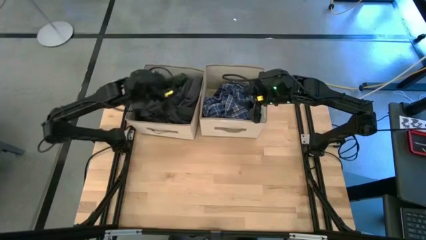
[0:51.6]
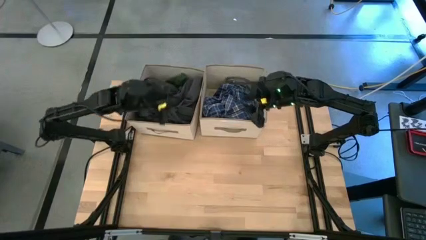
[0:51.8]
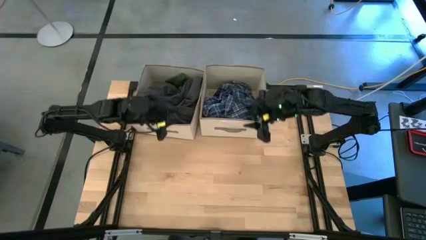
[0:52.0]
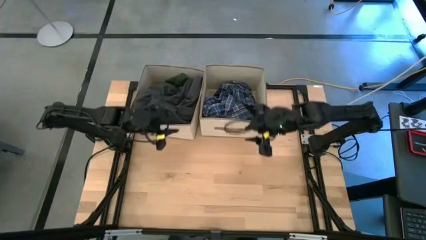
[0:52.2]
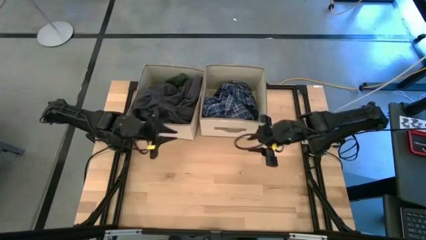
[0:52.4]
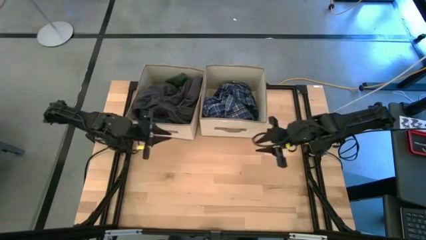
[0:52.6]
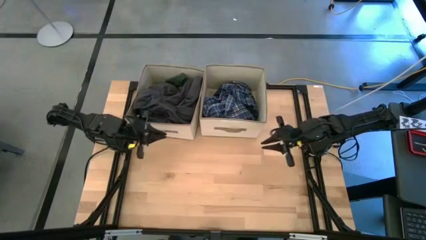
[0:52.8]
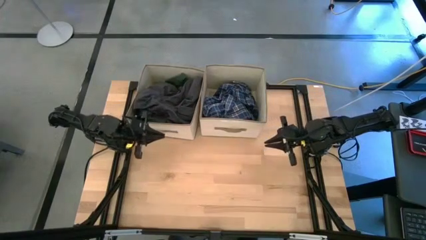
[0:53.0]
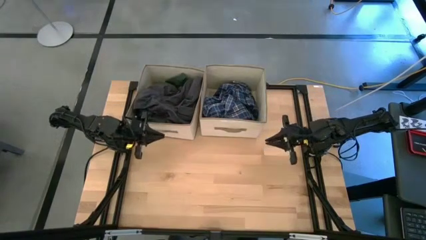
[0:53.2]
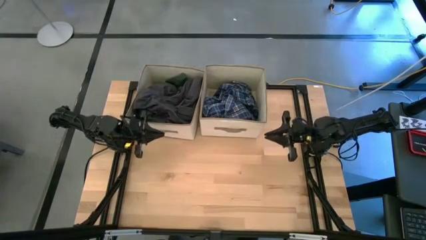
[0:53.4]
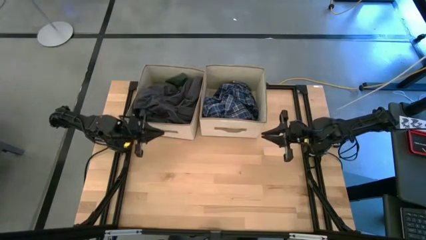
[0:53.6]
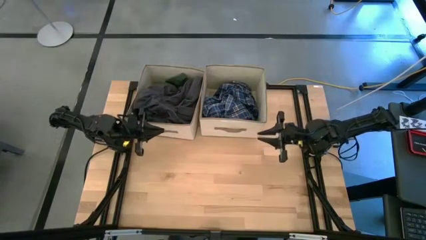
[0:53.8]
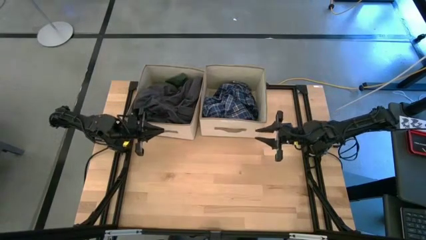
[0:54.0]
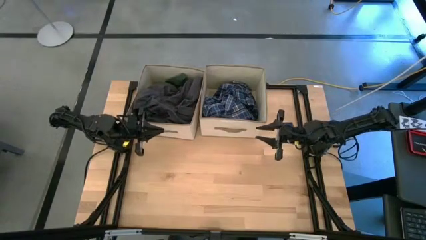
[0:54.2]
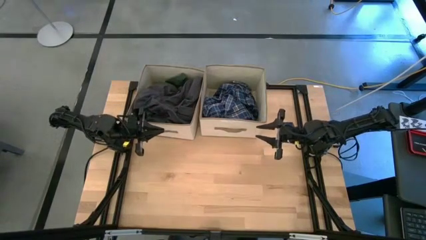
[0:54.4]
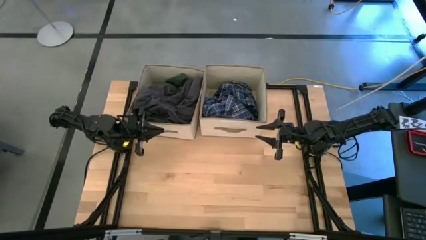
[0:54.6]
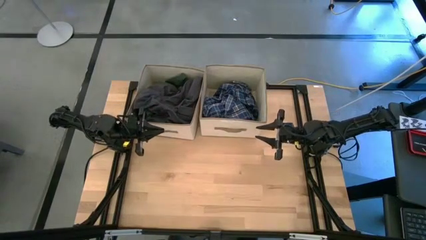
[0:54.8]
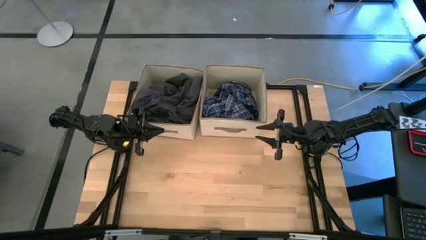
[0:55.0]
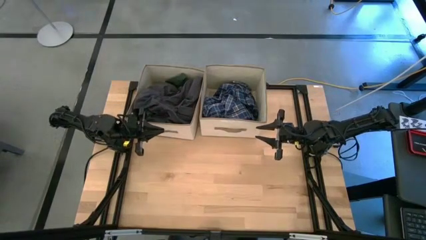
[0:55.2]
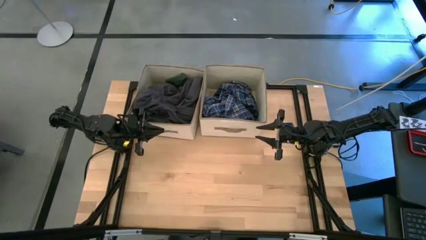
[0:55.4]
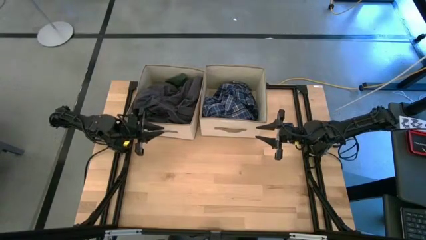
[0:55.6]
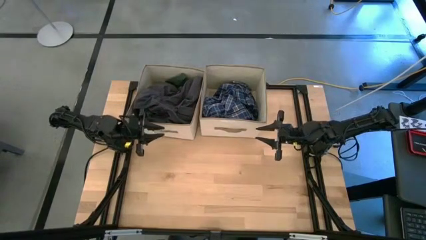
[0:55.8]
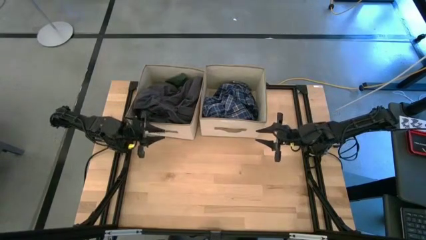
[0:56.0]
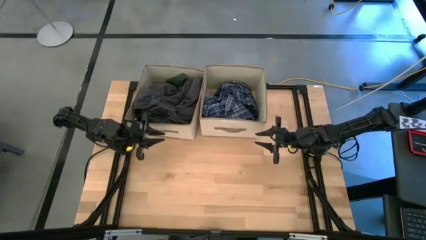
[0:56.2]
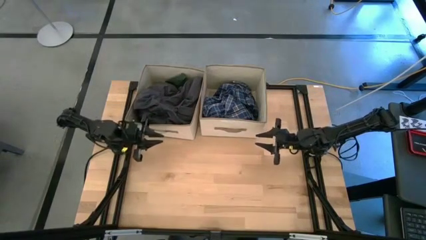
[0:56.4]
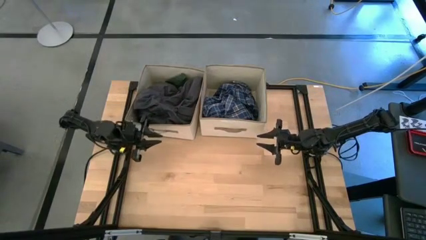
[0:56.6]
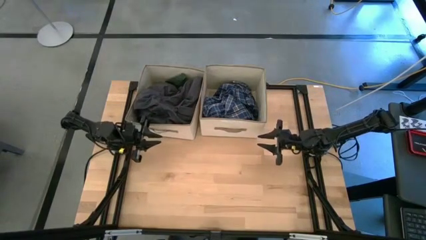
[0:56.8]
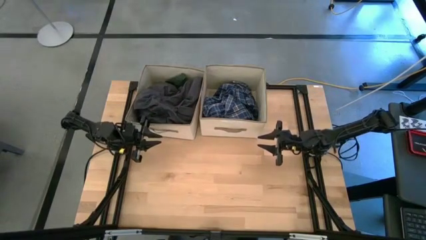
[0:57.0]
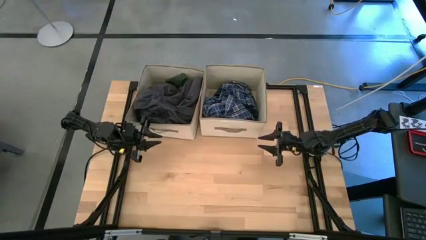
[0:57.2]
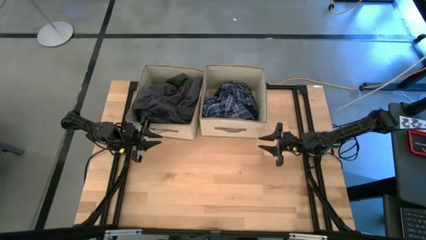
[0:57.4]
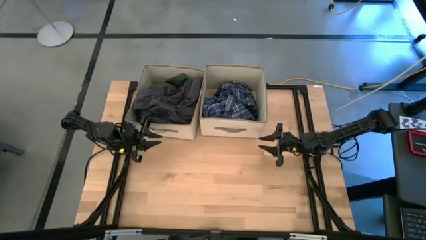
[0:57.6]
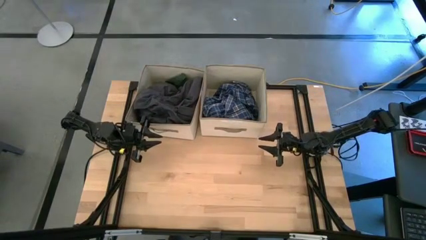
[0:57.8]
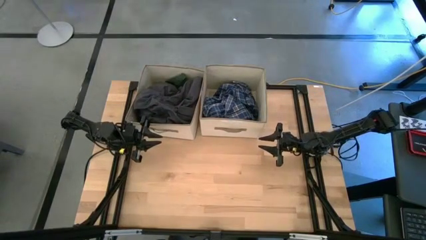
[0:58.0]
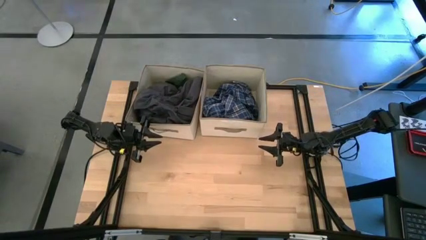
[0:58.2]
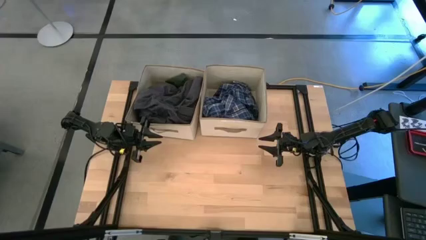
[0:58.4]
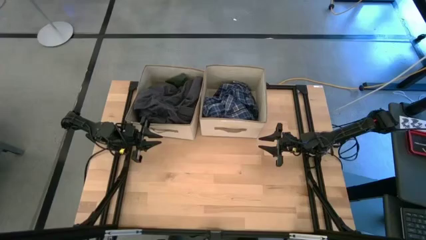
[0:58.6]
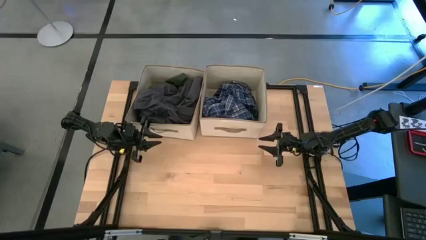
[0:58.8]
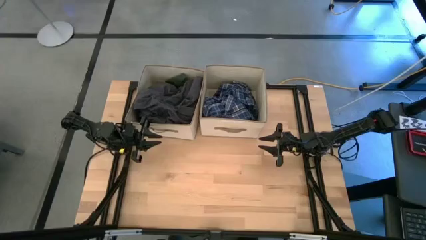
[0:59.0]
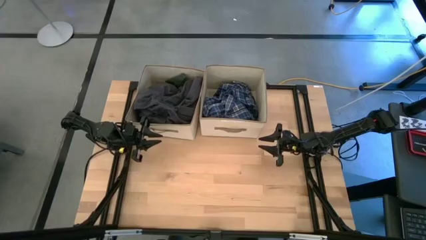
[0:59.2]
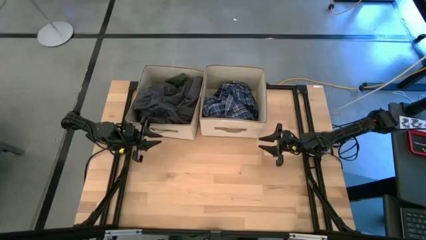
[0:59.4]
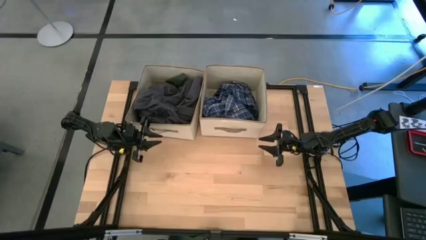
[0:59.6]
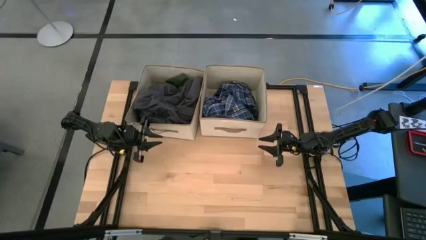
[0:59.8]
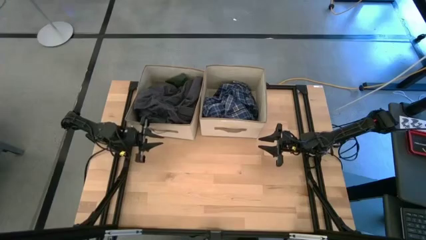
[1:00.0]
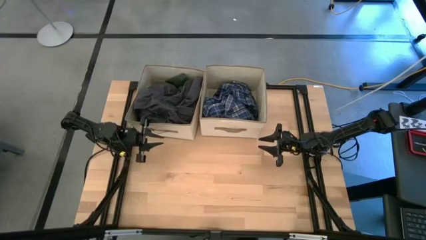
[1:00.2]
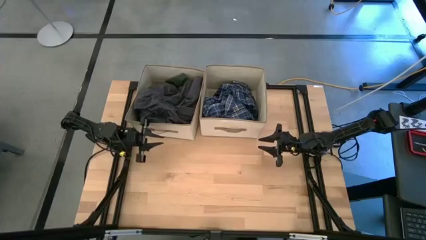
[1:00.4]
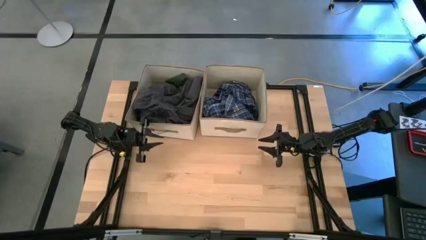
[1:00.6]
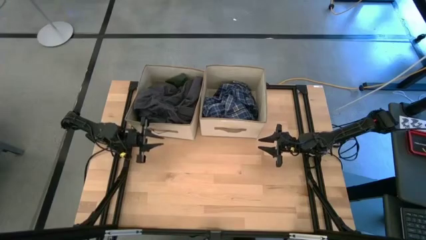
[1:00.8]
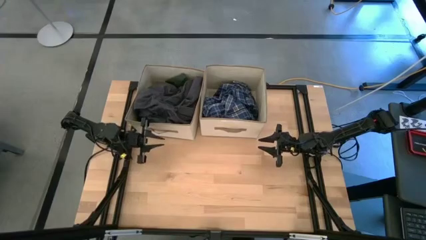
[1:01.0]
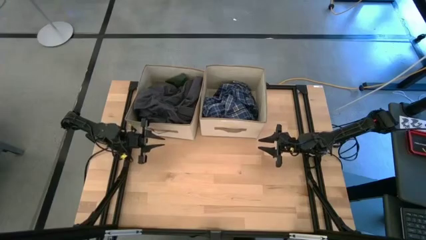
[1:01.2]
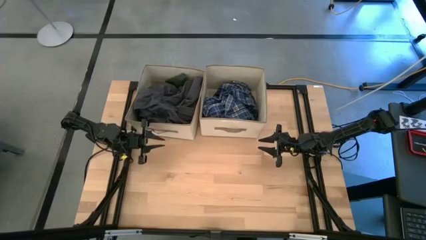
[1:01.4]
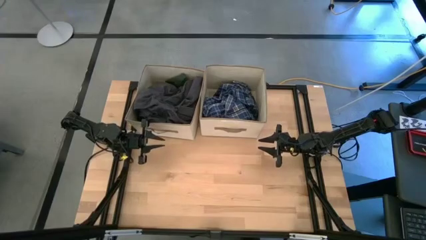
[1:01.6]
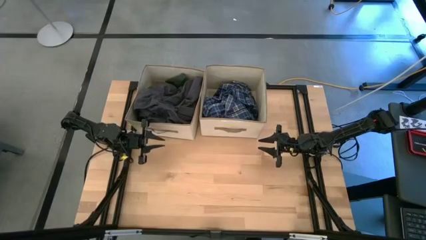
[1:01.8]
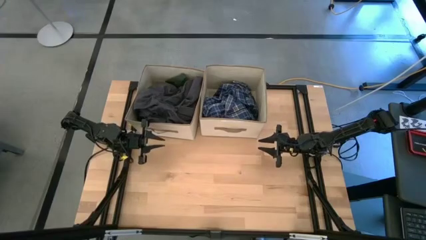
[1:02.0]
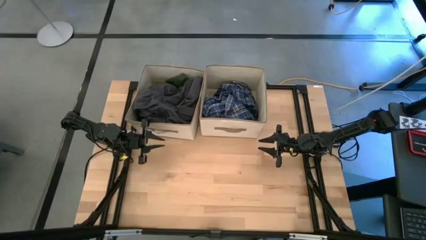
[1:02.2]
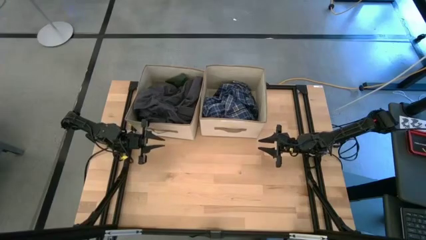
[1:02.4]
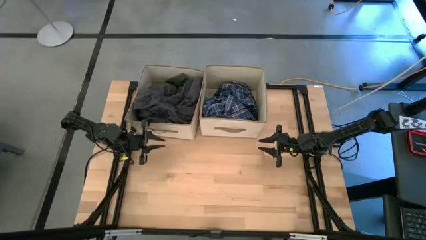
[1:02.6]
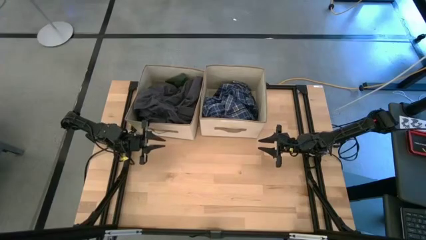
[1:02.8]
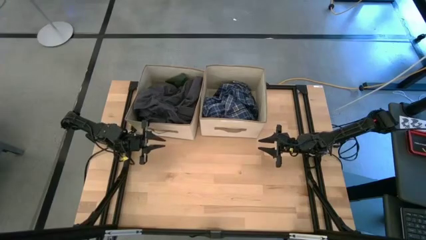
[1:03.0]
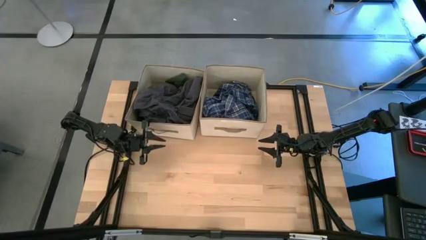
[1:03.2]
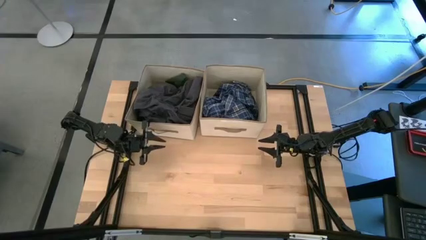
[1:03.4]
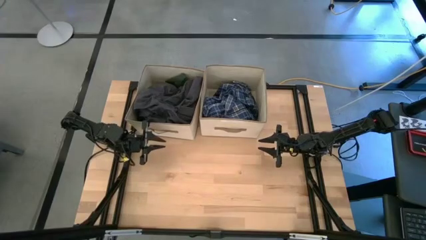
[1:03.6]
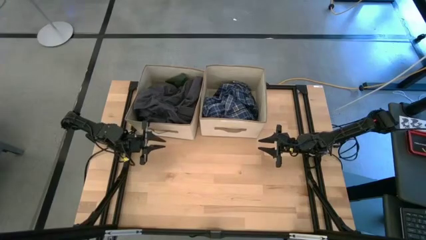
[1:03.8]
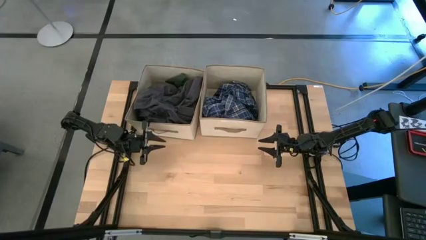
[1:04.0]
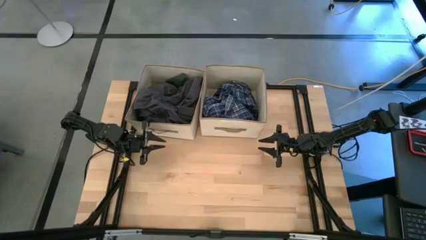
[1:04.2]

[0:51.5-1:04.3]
Task: Sort clothes
Return to Home Position

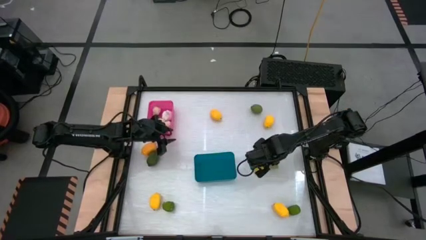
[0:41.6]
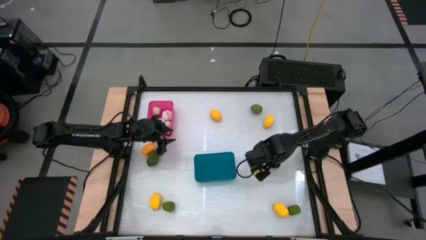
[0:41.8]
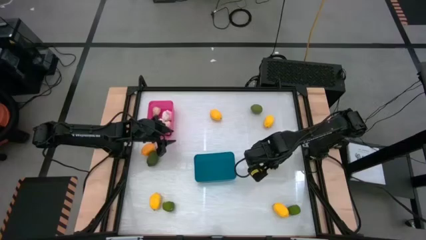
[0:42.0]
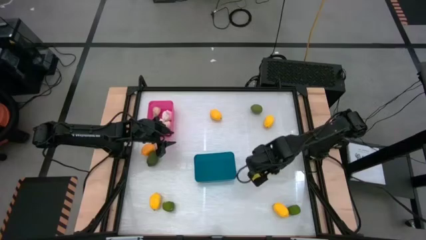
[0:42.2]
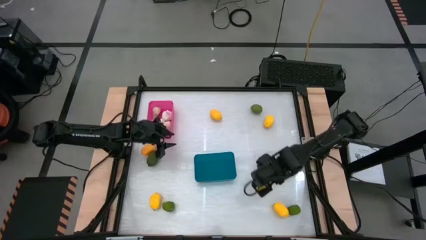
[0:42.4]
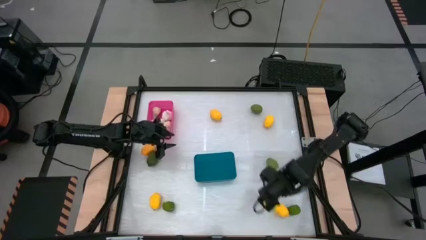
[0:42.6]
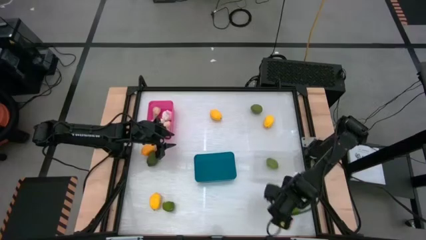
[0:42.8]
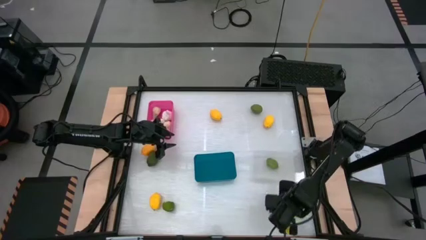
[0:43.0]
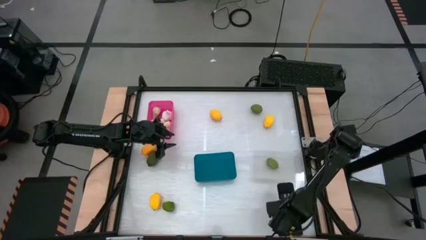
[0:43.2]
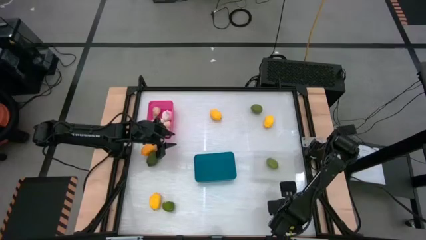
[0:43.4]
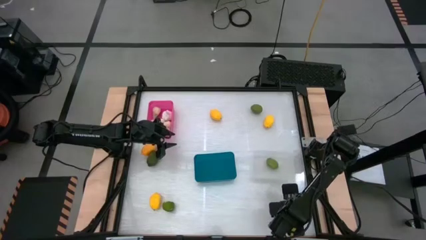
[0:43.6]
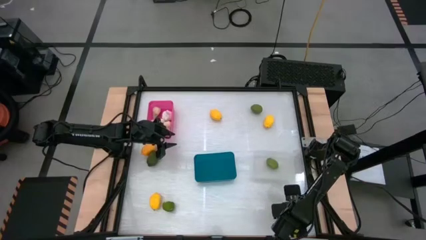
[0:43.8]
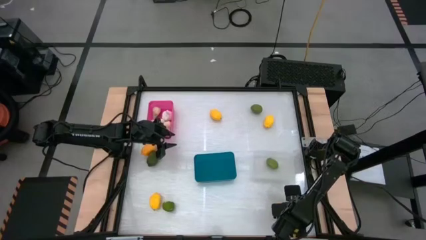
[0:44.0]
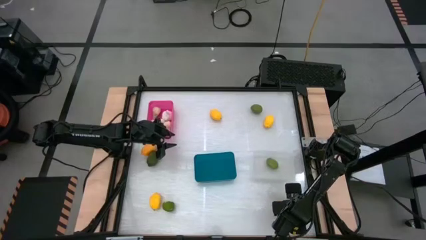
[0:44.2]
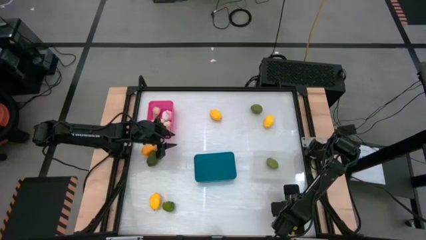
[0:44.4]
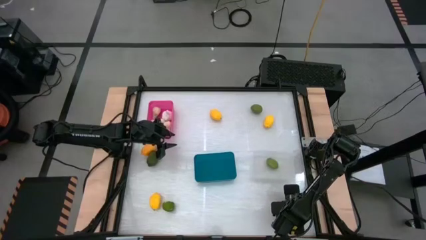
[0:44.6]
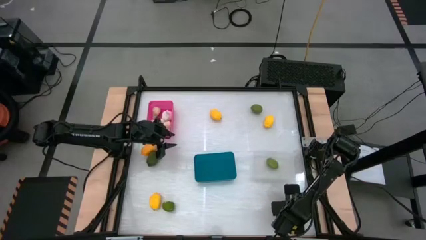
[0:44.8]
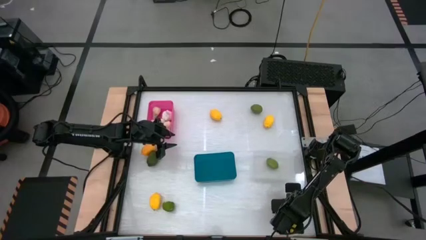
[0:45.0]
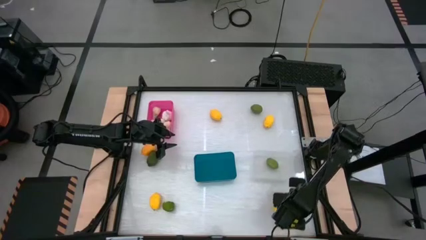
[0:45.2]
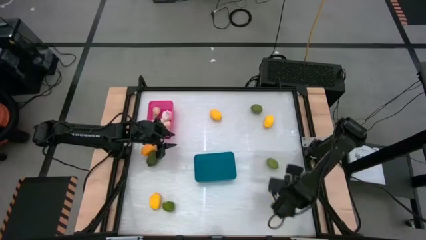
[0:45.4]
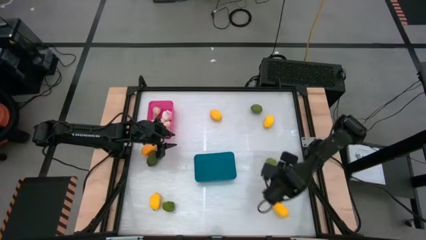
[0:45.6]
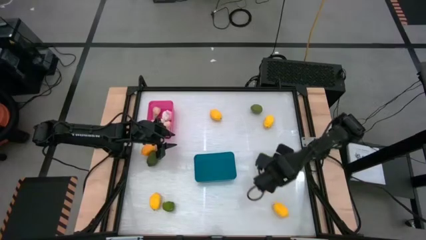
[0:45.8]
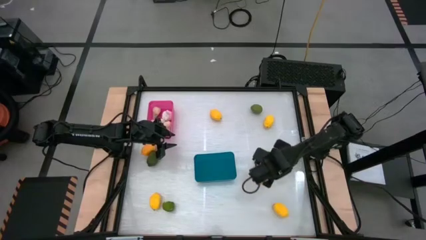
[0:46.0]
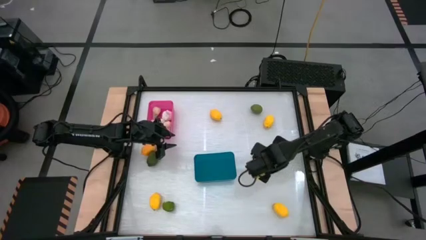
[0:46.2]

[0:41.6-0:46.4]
Task: Sort produce into baskets
Put the green lime into the white bin
